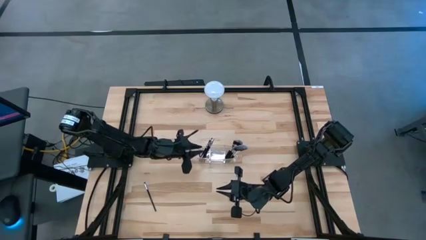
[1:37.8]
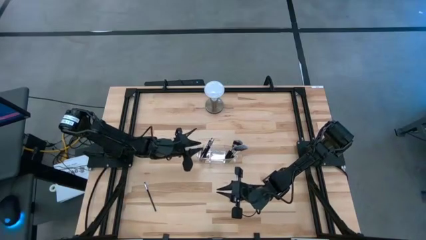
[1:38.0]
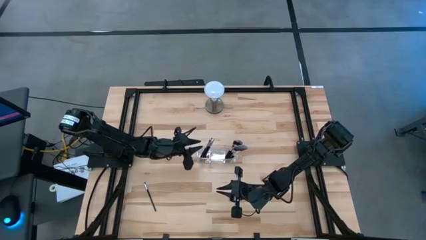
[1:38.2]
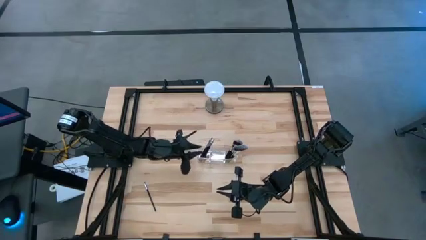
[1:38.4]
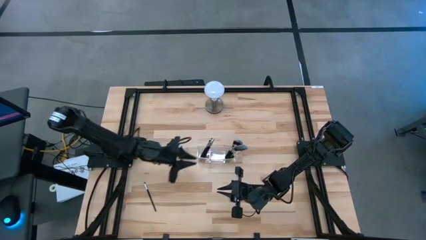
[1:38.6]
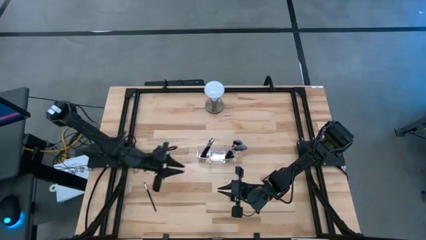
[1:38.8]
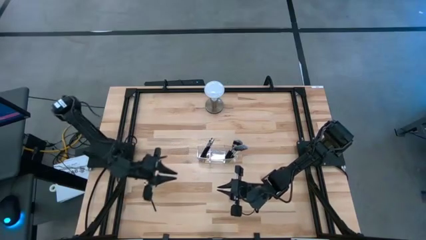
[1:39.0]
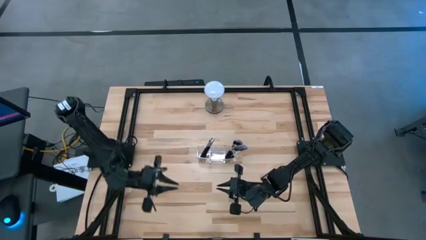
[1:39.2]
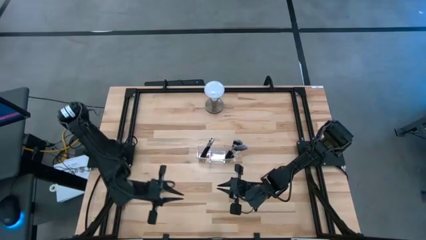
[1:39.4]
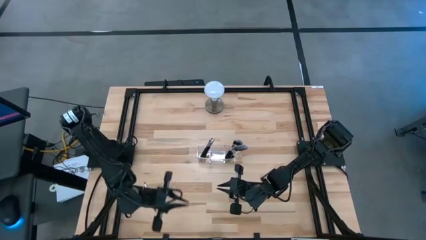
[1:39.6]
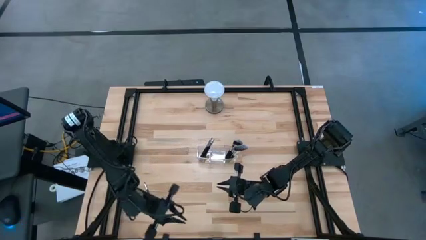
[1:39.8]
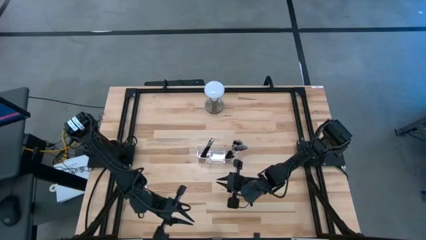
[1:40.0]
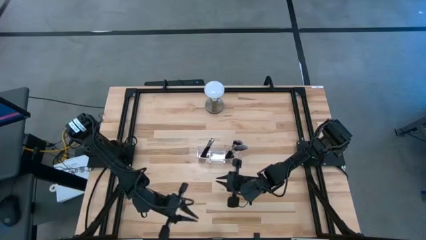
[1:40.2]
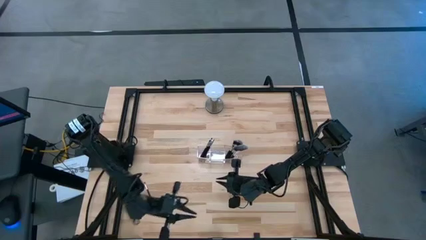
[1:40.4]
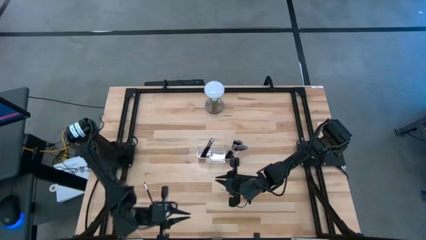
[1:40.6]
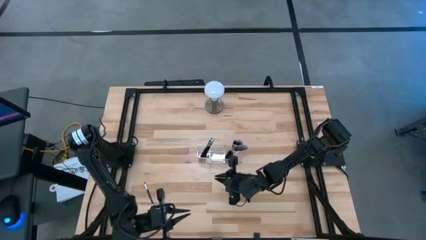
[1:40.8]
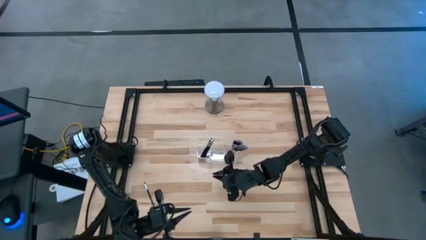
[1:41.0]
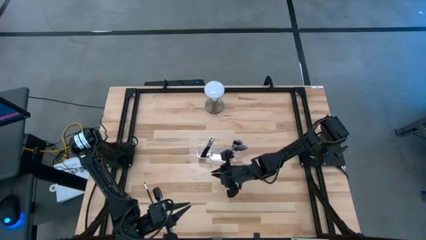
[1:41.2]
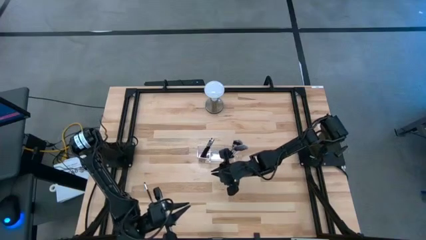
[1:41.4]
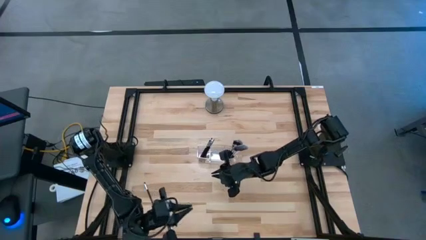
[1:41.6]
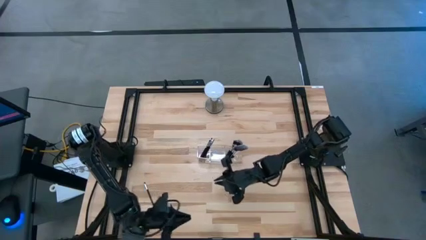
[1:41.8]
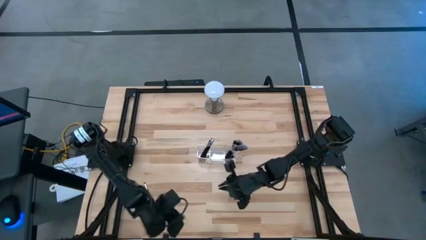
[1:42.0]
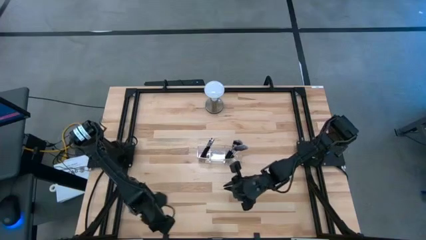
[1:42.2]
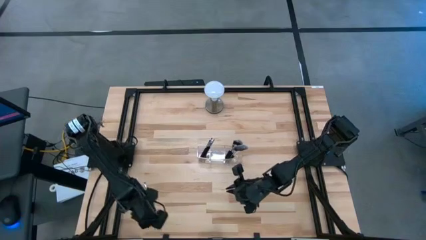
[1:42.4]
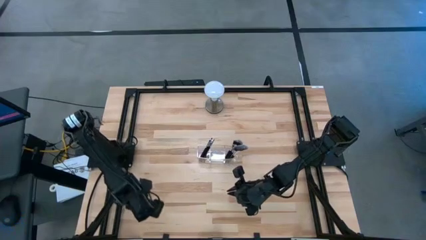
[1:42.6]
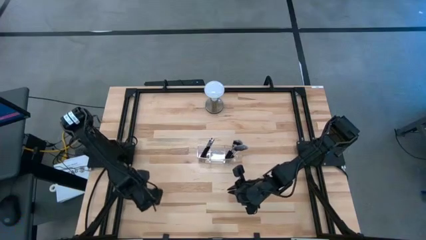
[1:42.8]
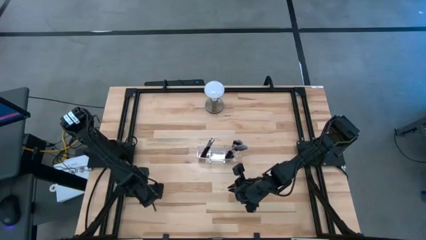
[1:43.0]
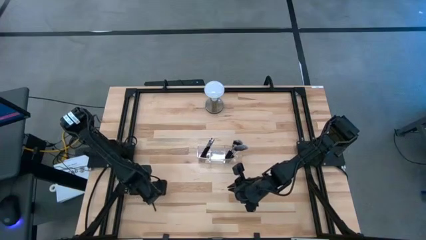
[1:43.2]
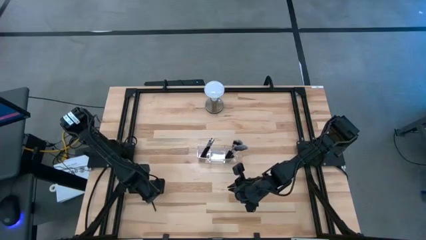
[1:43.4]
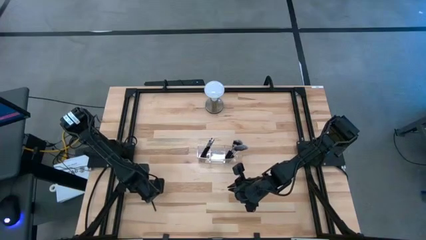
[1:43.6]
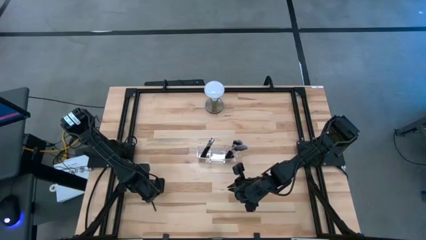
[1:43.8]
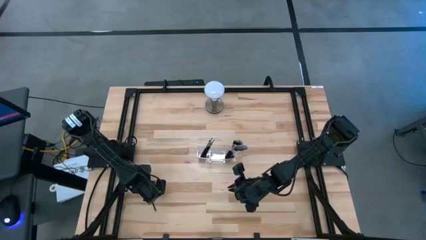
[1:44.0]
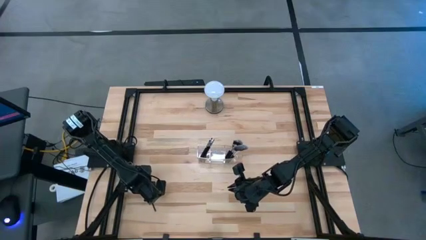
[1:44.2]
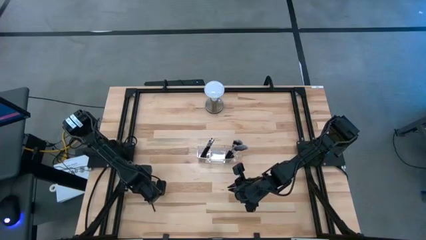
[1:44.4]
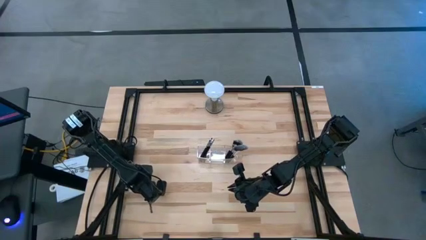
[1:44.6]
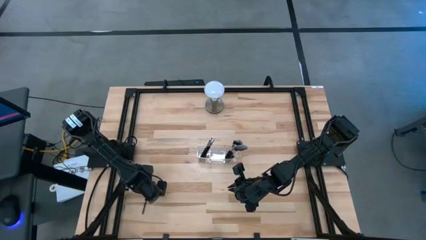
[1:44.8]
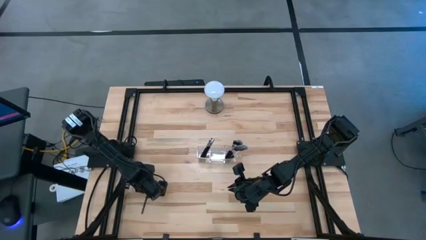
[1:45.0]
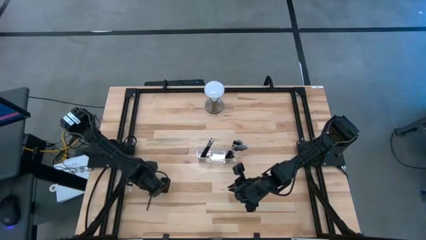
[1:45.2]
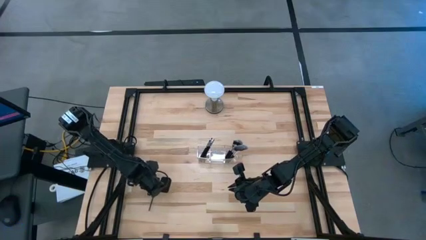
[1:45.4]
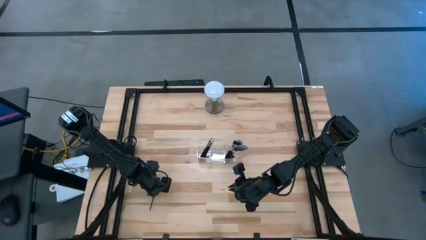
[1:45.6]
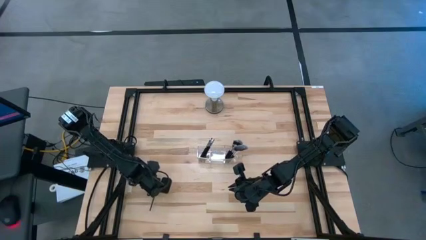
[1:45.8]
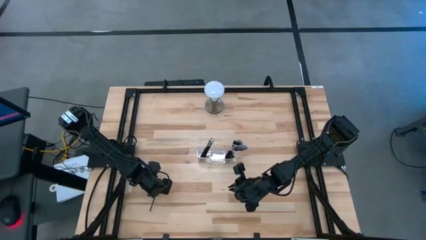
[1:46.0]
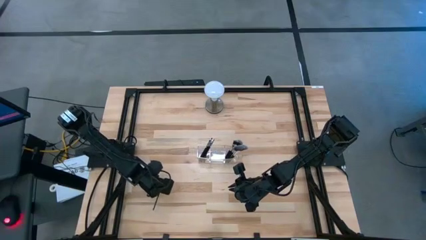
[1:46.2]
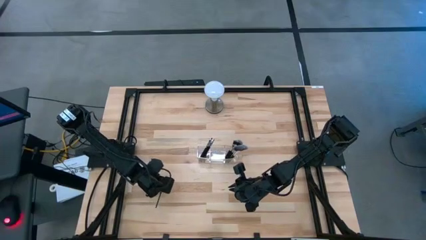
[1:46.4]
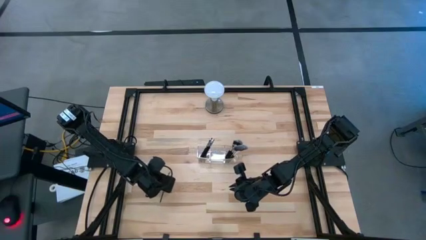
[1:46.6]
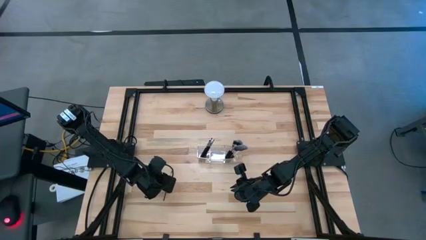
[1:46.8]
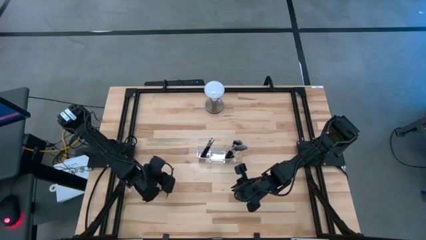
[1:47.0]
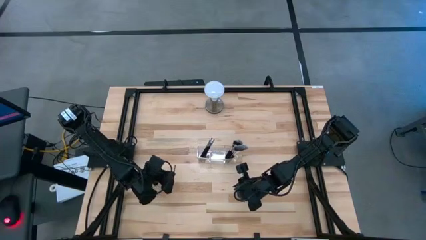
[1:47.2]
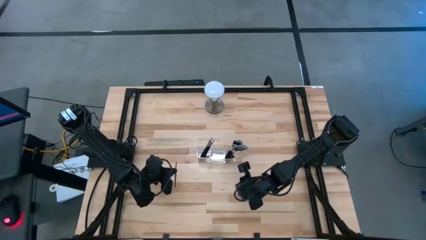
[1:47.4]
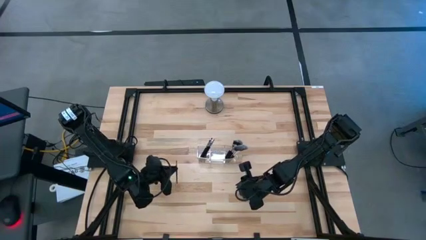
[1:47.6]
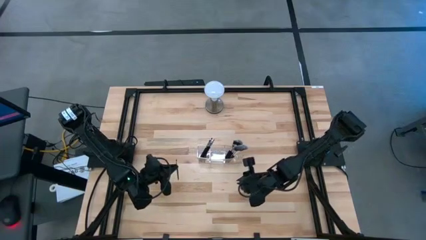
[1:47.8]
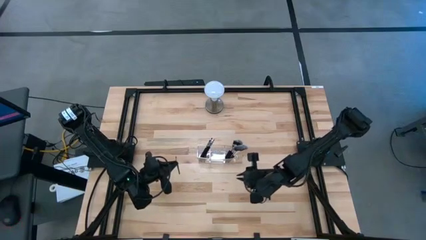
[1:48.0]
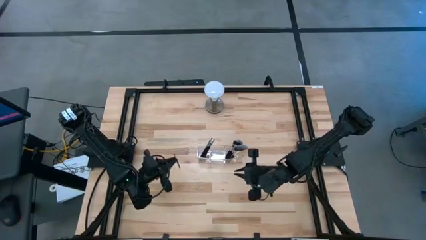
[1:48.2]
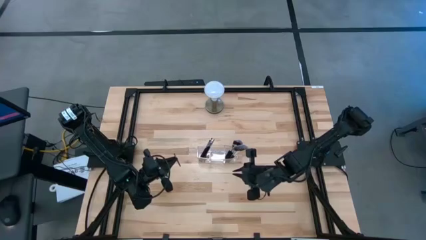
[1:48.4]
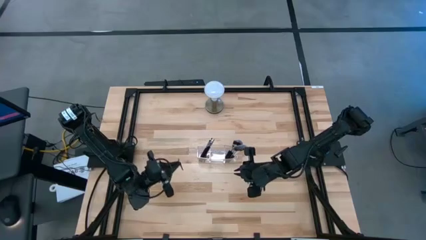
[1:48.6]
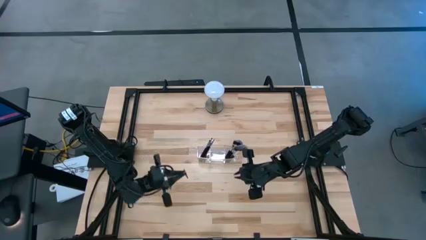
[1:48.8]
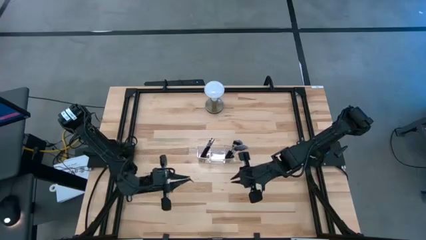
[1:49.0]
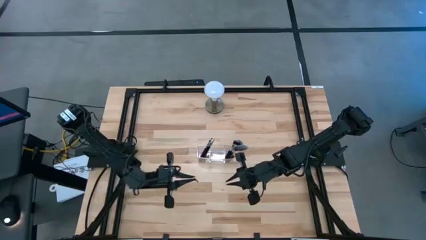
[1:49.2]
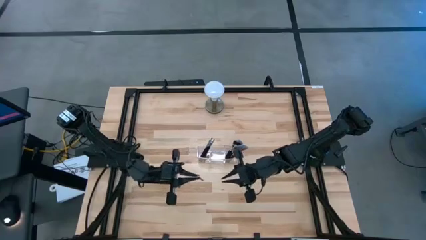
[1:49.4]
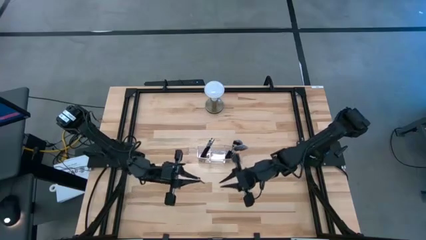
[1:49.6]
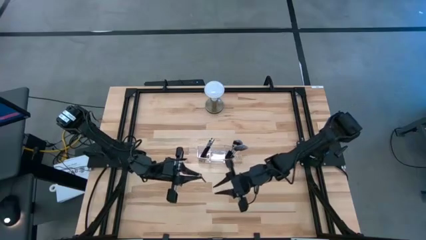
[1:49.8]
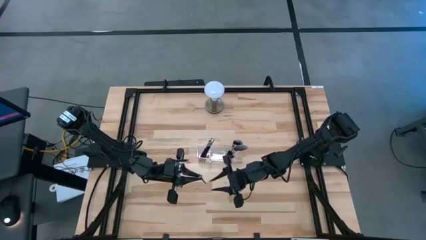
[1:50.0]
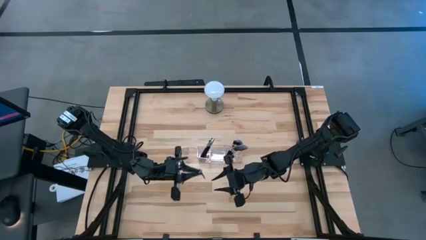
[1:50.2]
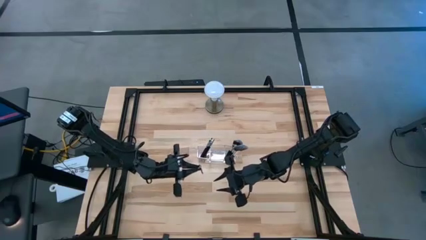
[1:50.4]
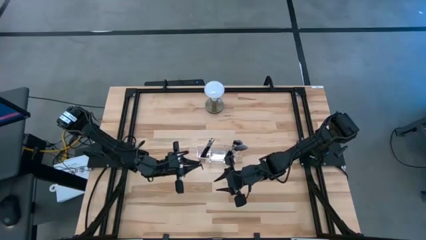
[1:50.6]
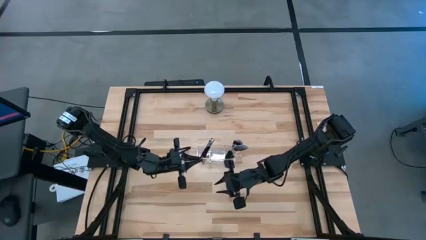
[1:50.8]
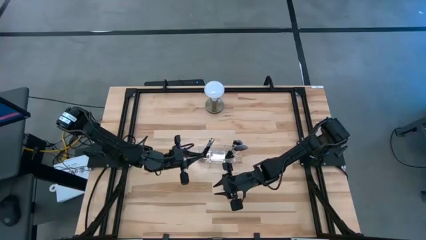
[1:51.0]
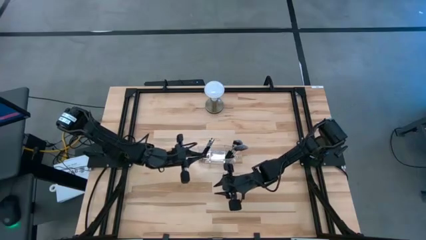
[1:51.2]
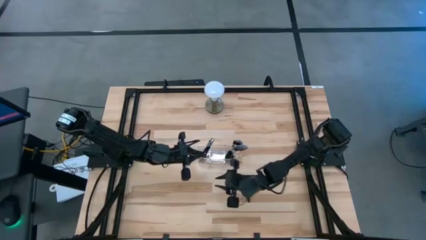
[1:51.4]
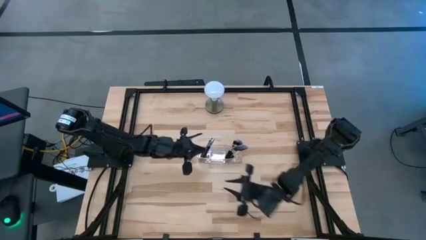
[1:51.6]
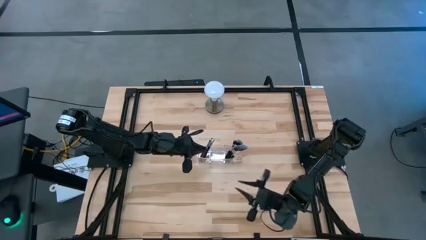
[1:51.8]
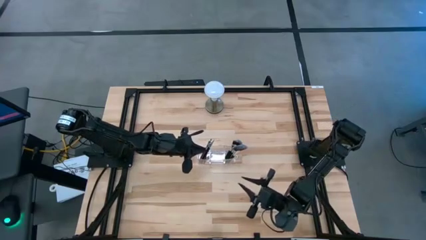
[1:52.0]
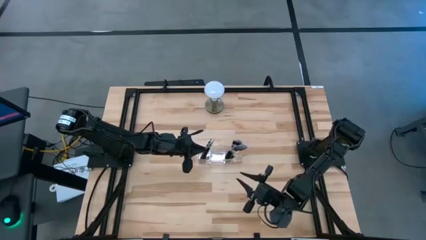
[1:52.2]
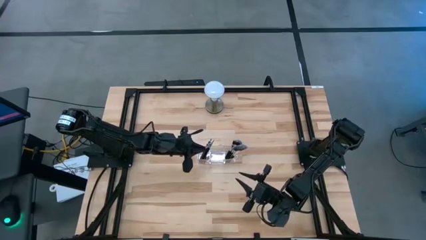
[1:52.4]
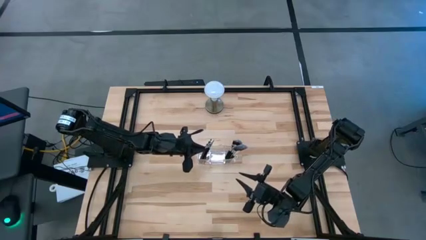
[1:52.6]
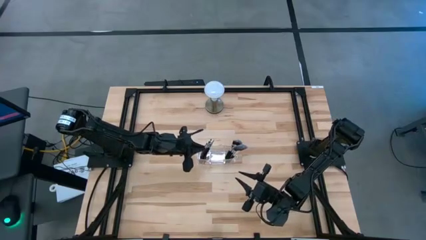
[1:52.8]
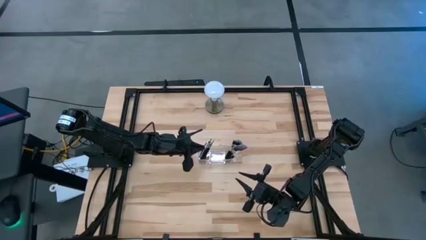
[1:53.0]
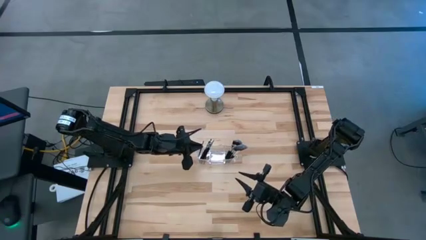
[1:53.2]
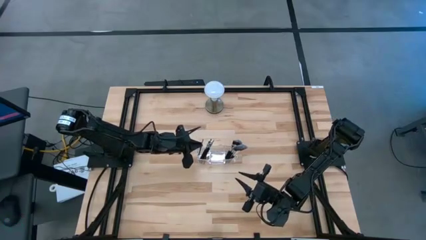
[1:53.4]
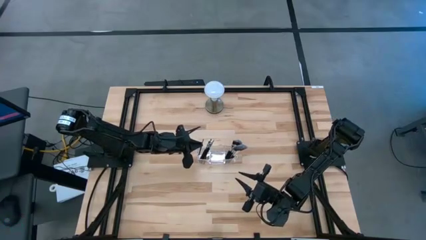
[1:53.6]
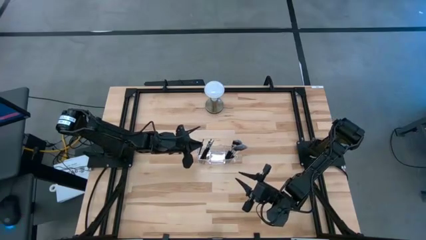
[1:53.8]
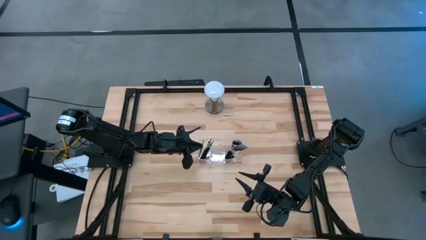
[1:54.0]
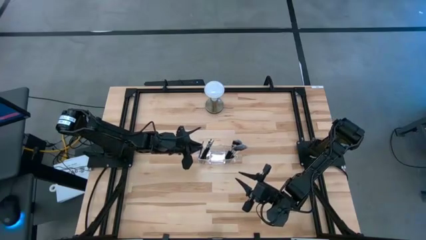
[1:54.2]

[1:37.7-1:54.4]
Task: Put items in baskets/containers
Put the black eyeshadow brush into the transparent organizer

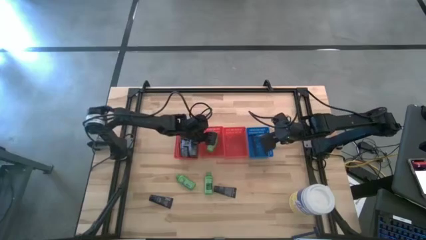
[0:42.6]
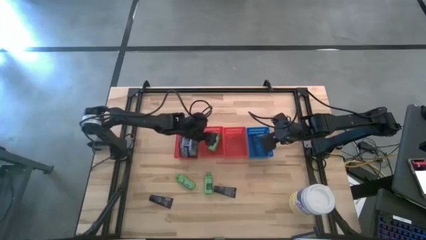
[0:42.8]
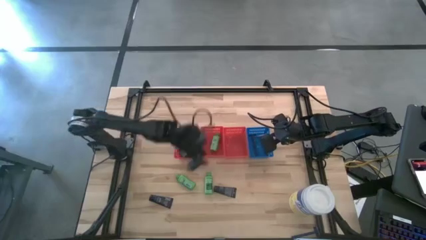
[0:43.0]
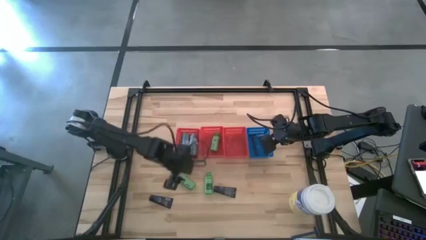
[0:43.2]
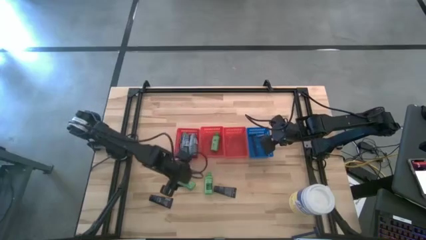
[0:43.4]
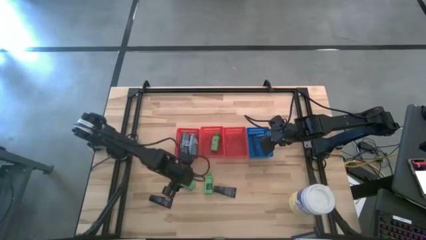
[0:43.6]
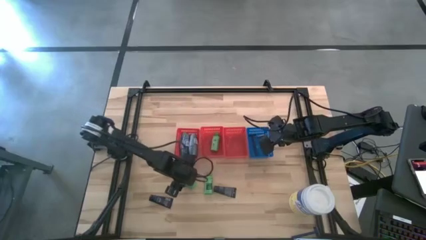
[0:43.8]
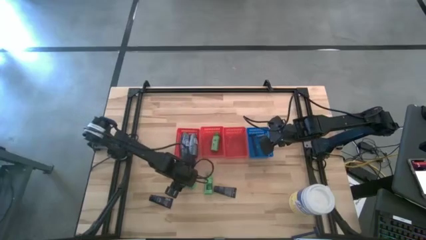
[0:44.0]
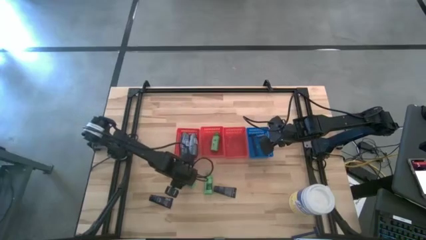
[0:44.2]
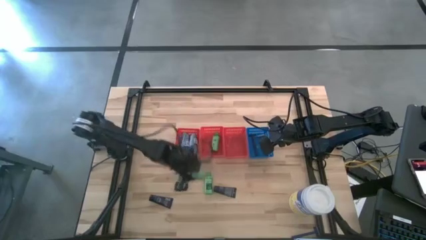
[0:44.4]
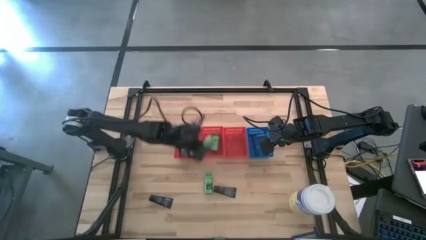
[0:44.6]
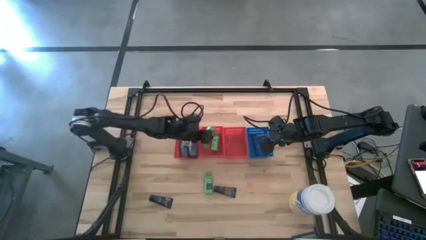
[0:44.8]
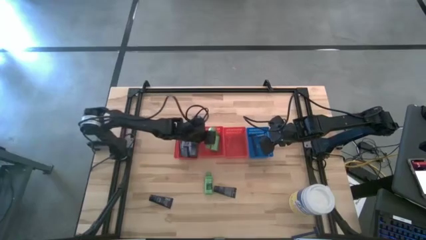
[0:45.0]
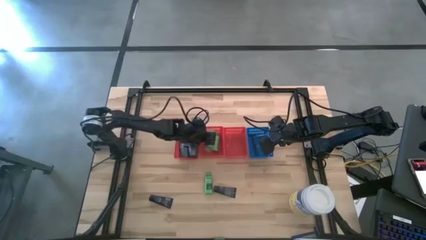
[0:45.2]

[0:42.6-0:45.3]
Task: Pick & Place Travel size toiletries
Put the green shampoo bottle into the middle red bin
